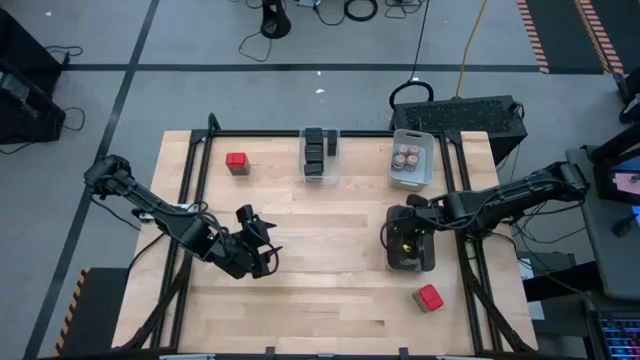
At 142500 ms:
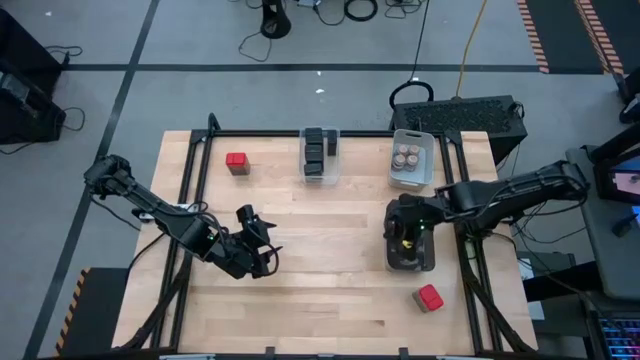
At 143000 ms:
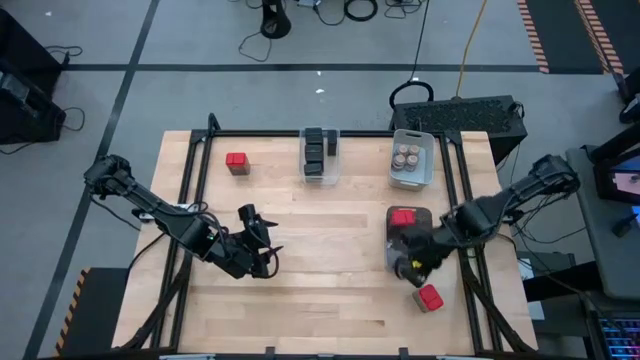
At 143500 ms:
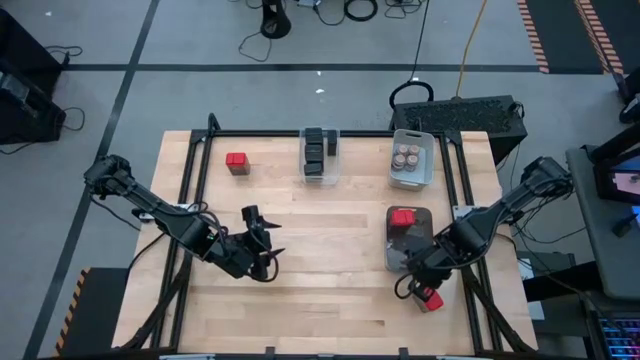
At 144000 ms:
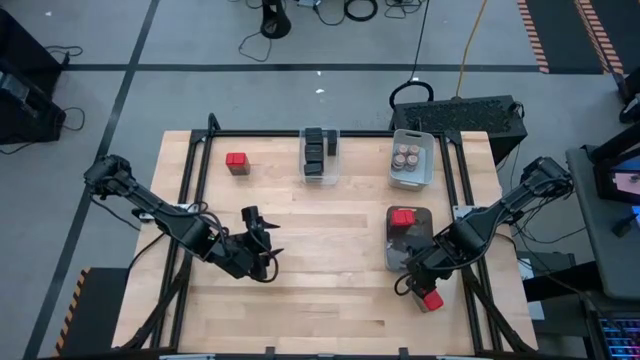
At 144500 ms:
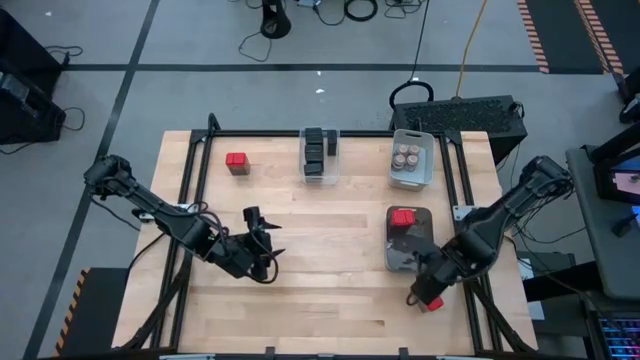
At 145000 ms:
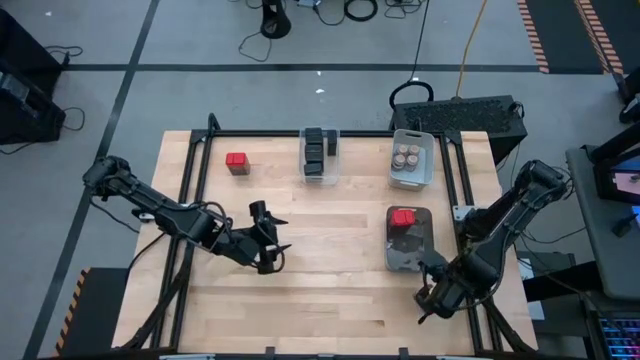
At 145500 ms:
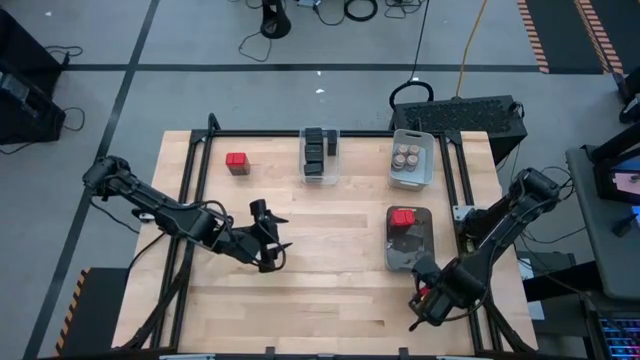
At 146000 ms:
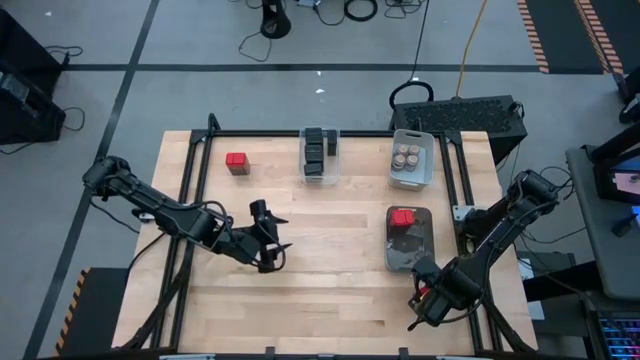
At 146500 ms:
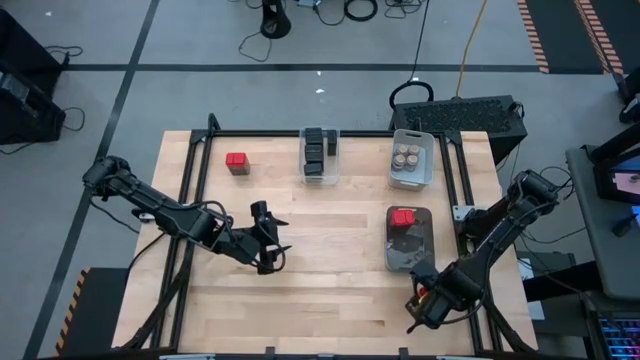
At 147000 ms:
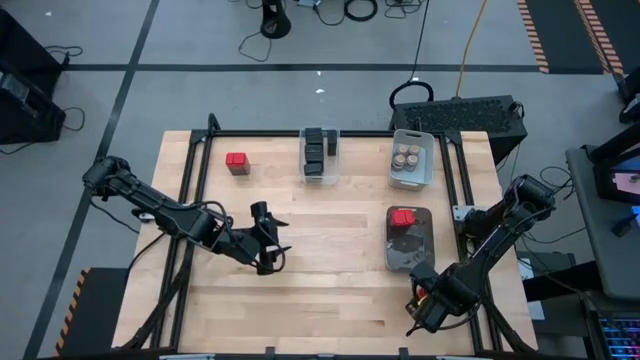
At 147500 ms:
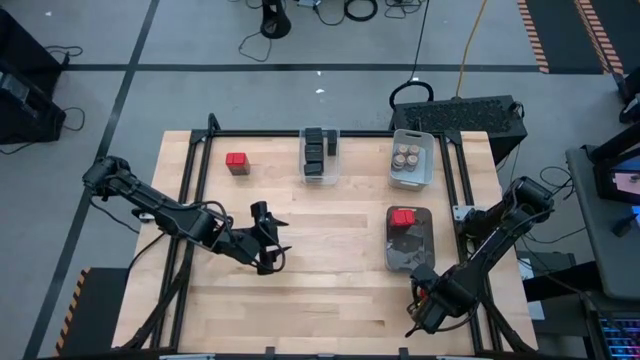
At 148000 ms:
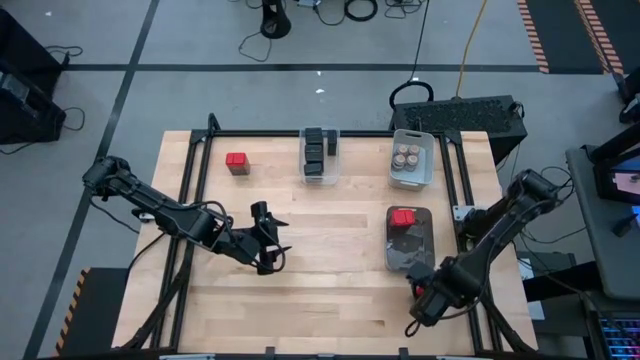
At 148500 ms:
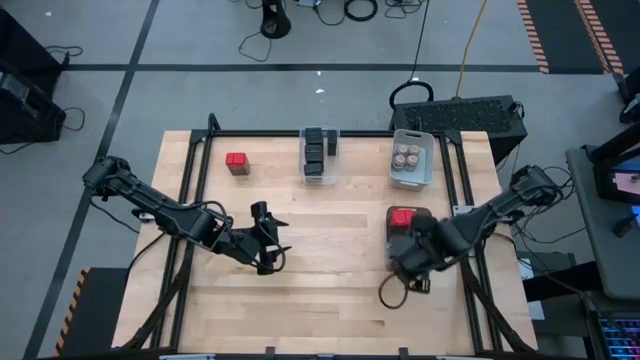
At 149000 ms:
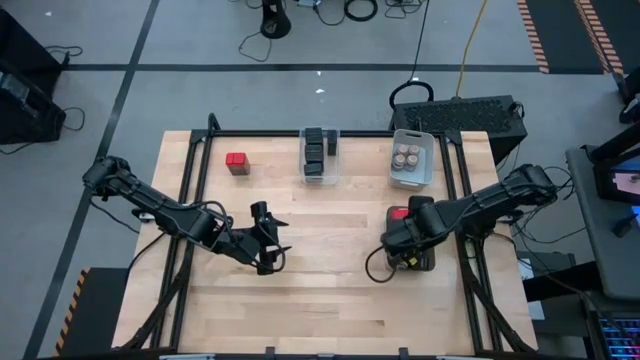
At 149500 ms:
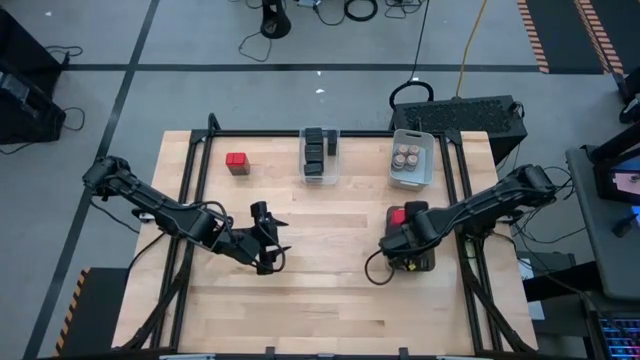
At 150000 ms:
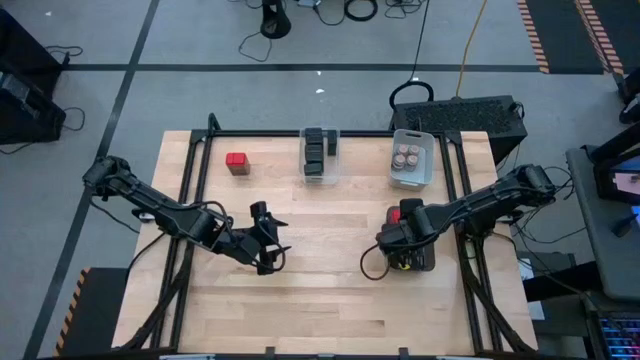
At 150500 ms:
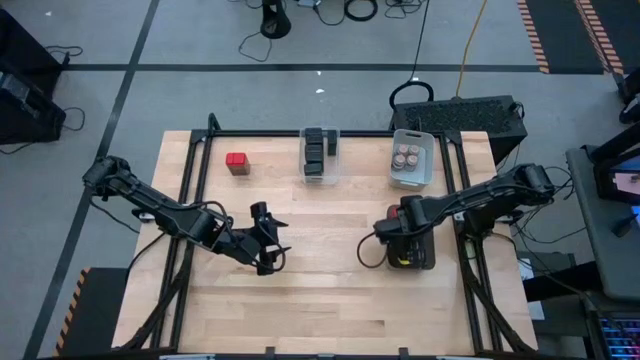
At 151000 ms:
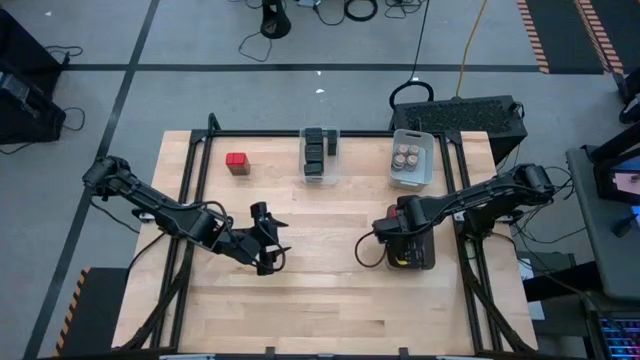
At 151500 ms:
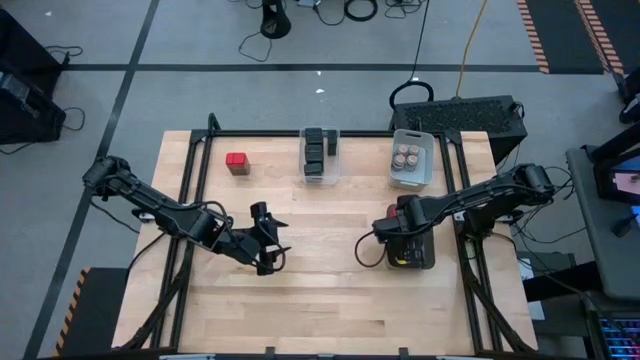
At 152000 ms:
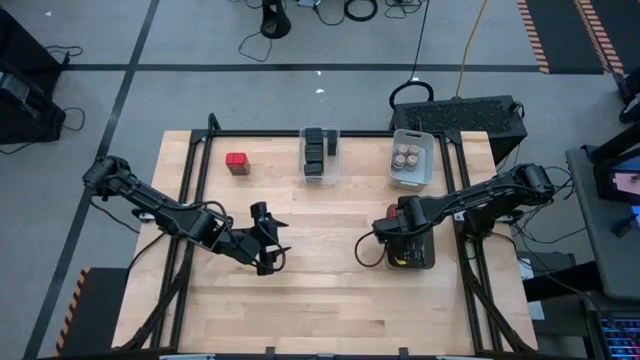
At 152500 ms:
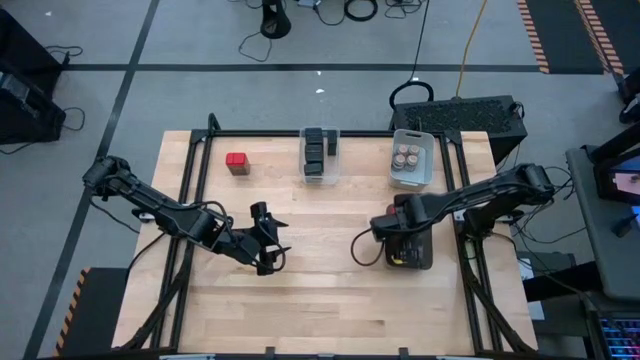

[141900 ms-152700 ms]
Task: Sort spices by type
Put the bottom red seasoning can into the black transparent bin

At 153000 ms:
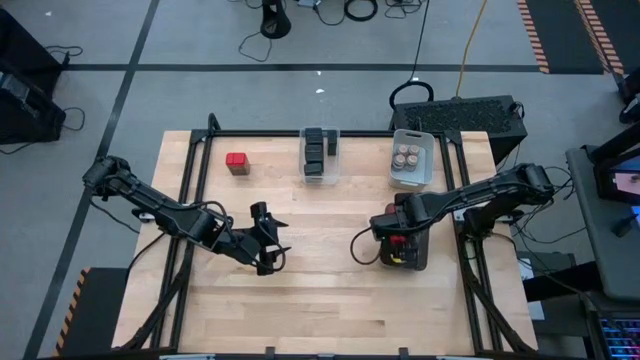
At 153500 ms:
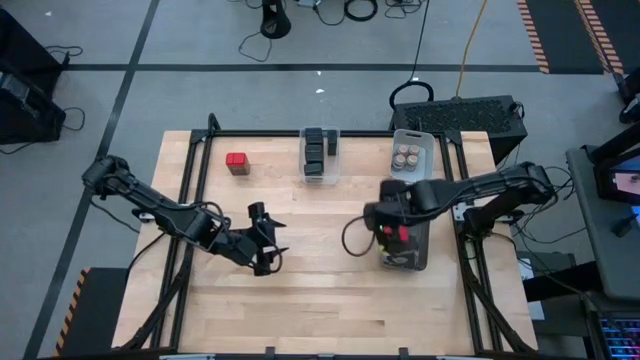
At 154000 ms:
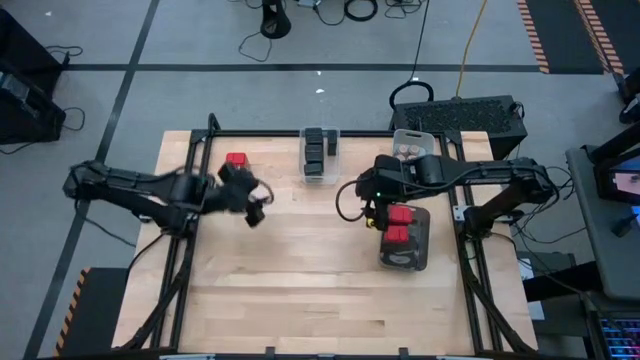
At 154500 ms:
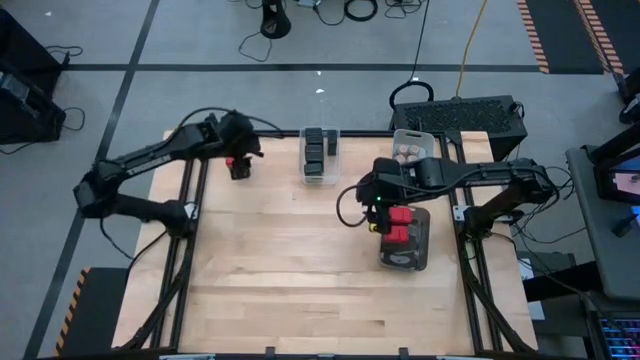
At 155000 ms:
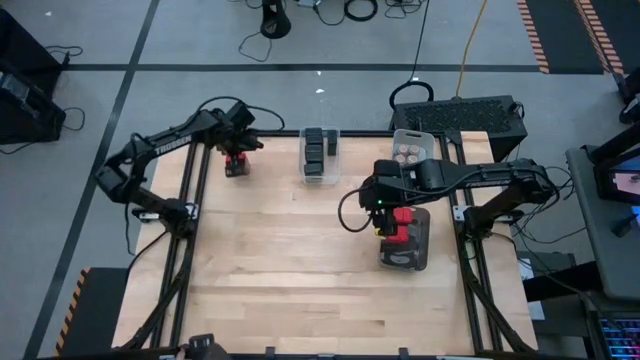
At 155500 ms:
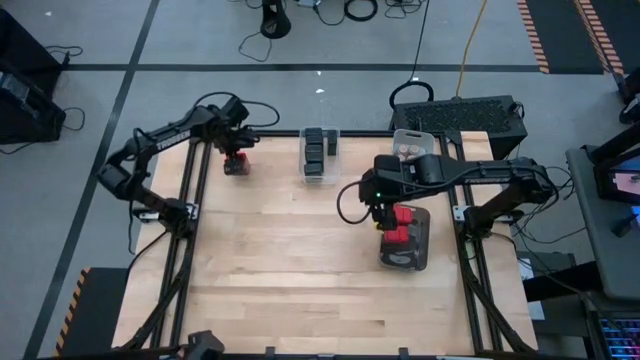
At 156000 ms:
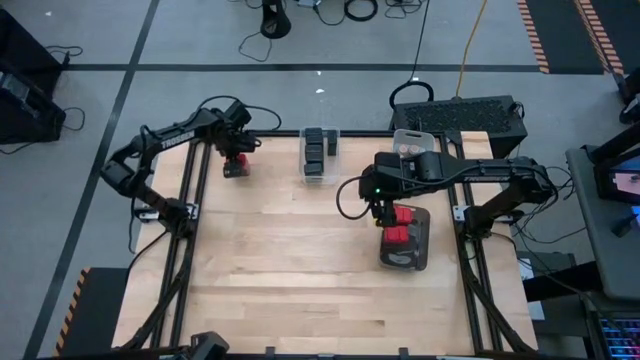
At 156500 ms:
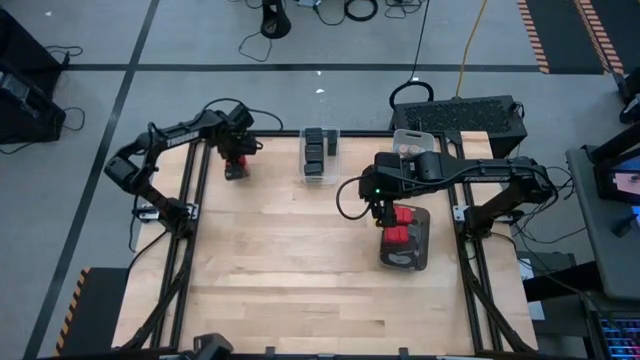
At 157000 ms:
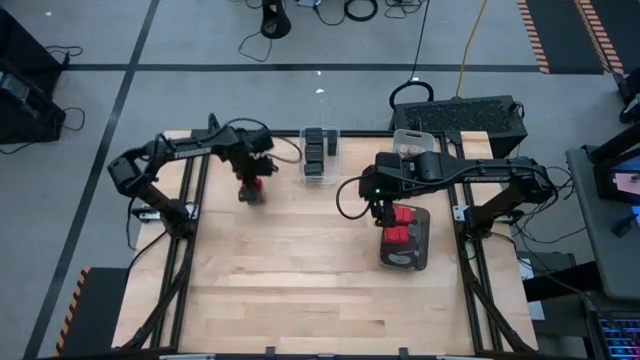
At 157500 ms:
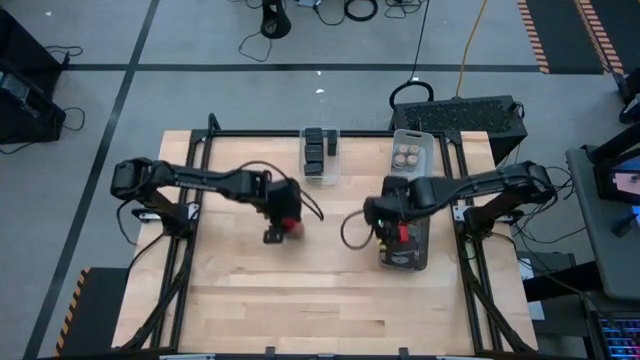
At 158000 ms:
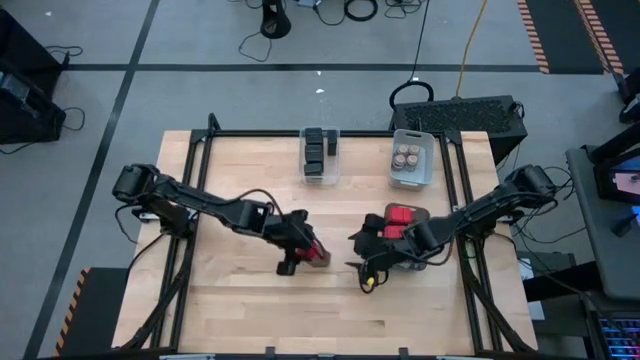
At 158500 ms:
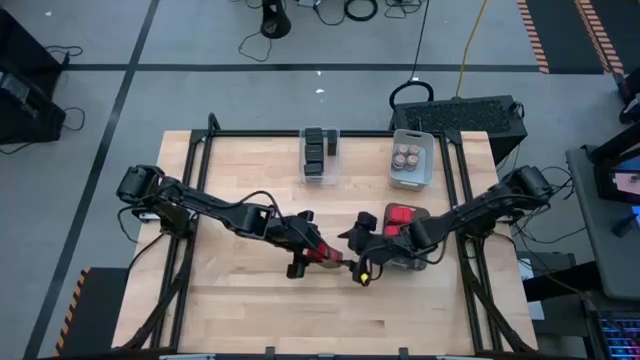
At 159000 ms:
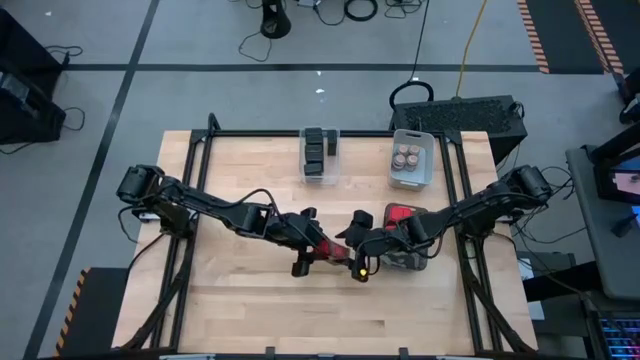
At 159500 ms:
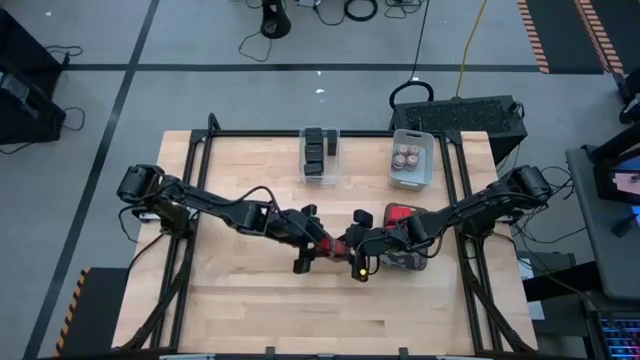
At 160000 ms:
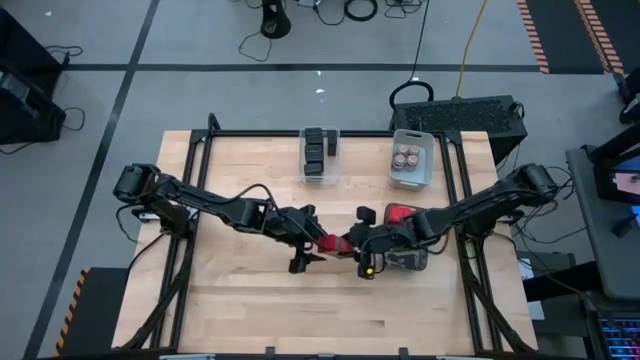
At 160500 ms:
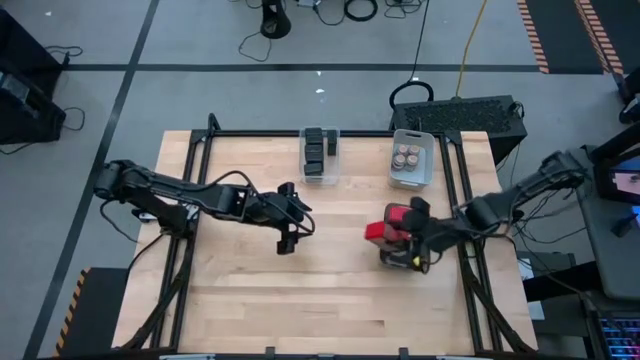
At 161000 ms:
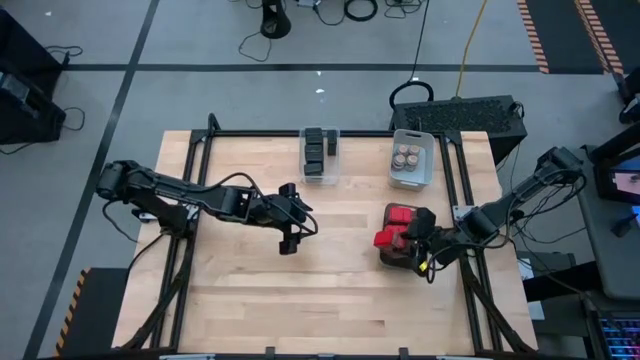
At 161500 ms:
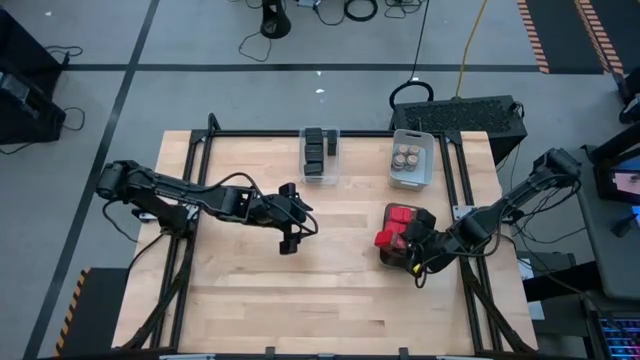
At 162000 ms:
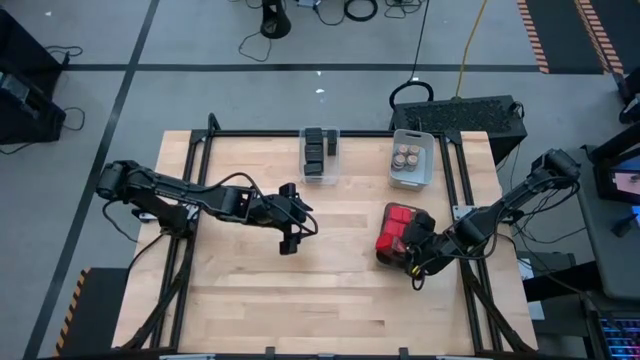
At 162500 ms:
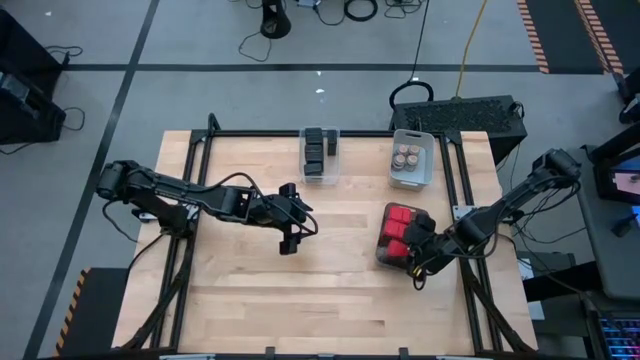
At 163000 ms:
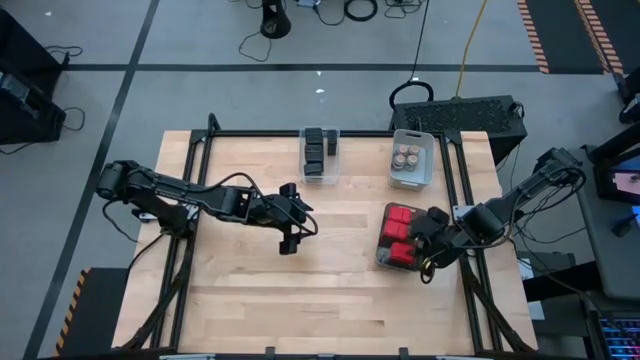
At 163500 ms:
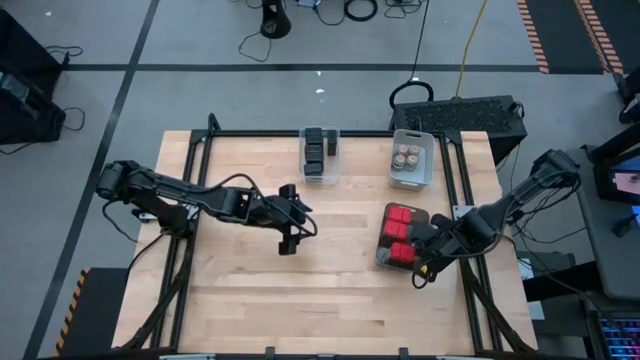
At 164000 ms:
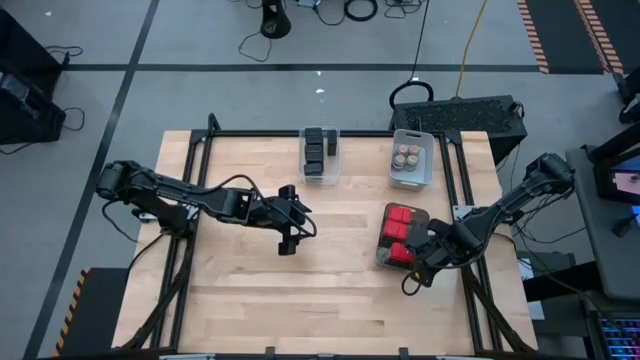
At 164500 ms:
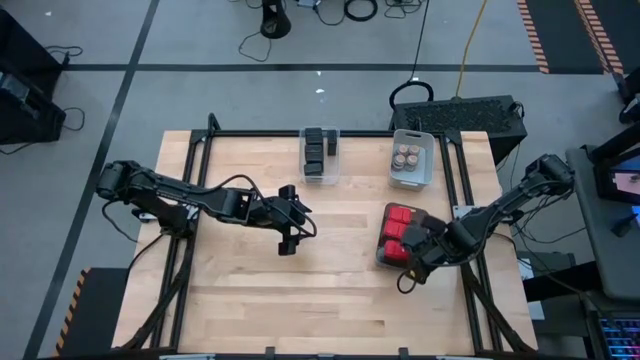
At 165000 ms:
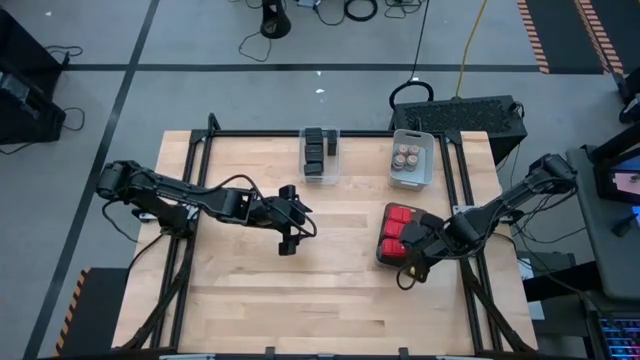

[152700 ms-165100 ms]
Put the red seasoning can into the black transparent bin
